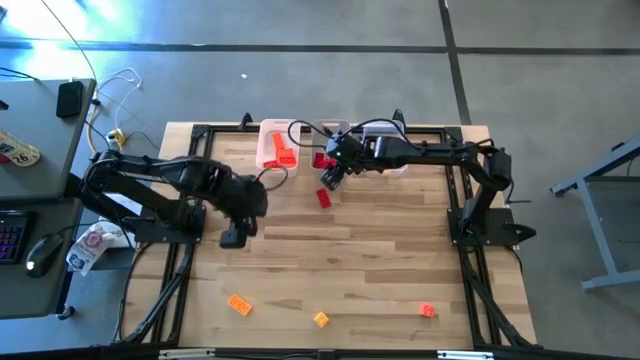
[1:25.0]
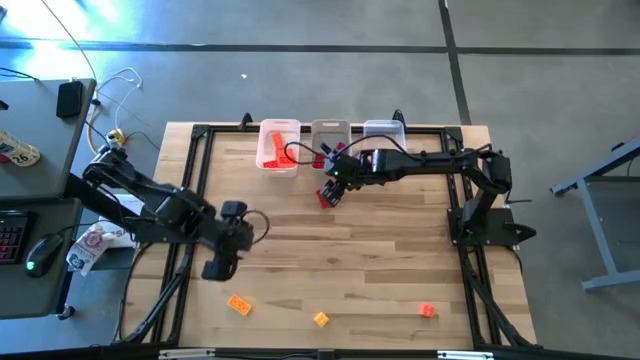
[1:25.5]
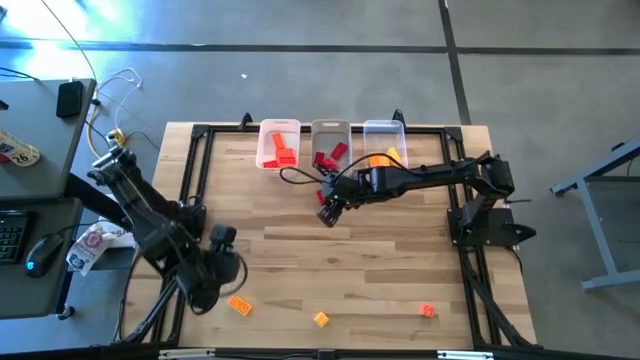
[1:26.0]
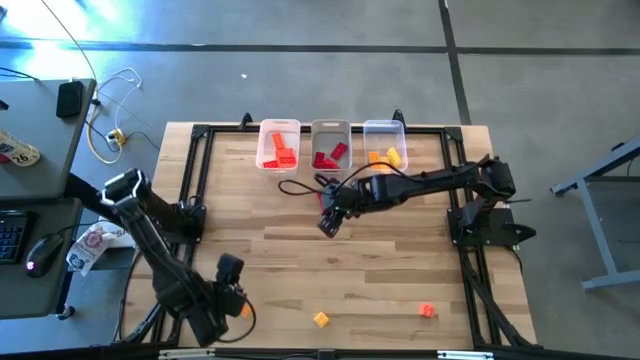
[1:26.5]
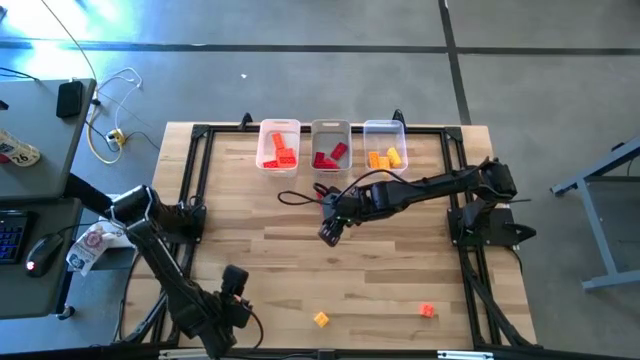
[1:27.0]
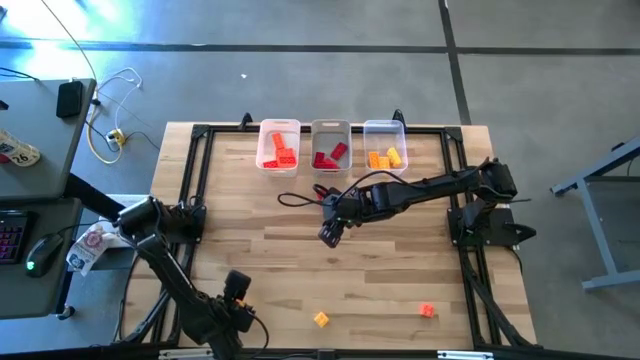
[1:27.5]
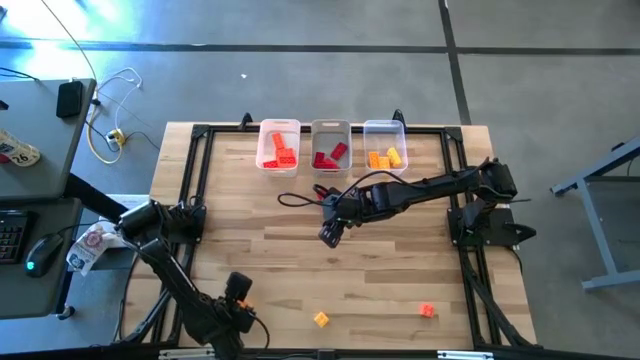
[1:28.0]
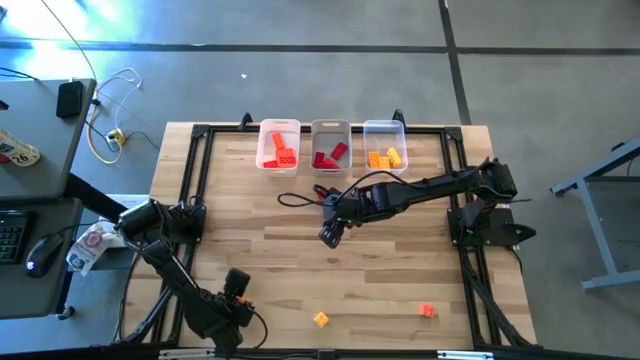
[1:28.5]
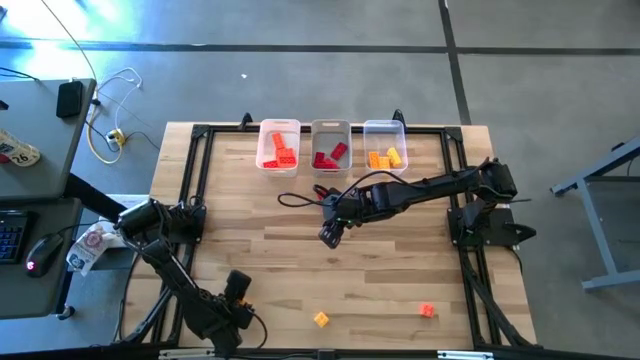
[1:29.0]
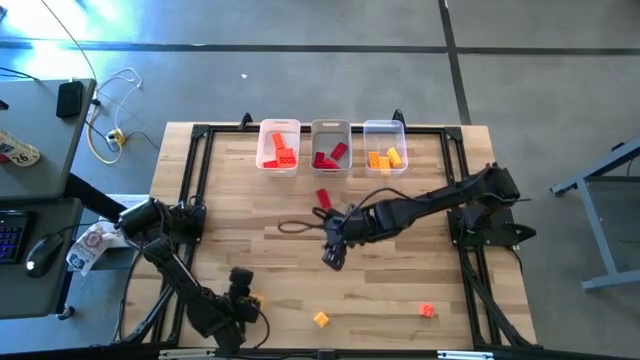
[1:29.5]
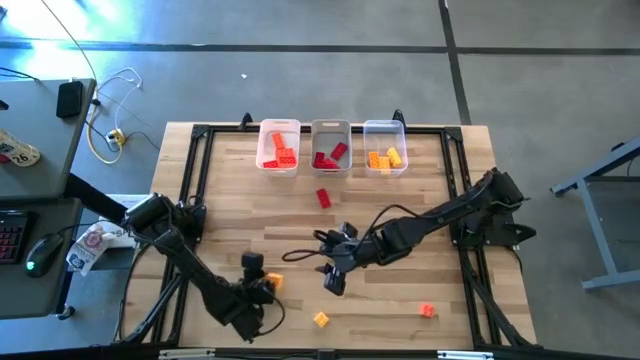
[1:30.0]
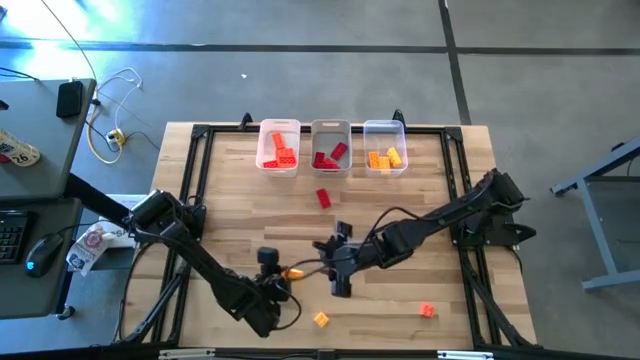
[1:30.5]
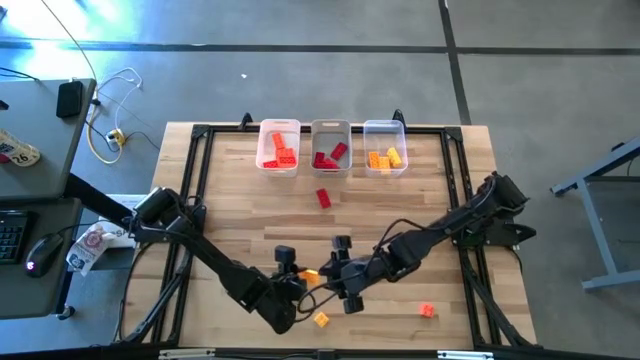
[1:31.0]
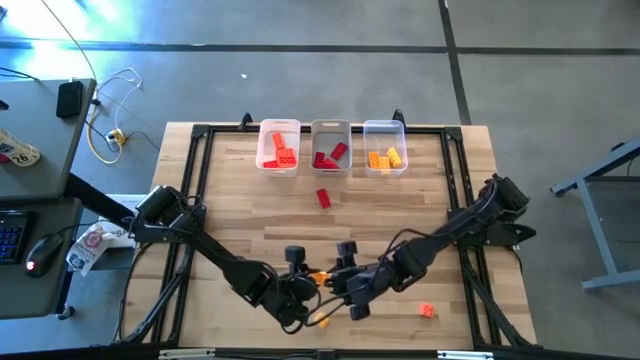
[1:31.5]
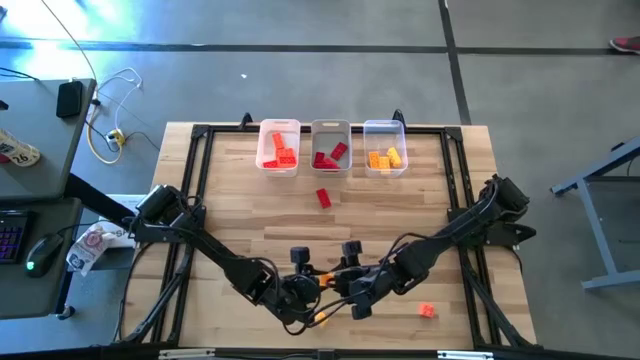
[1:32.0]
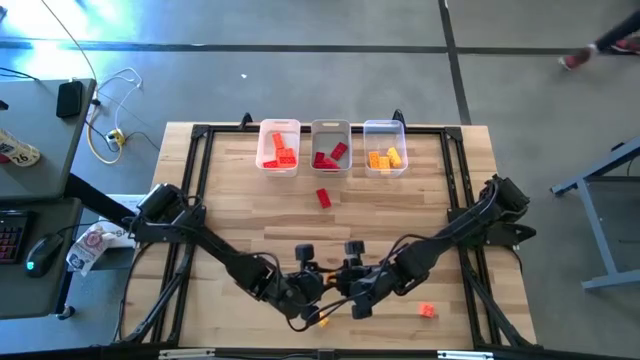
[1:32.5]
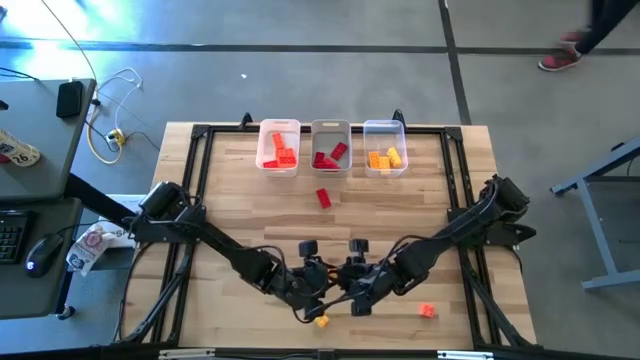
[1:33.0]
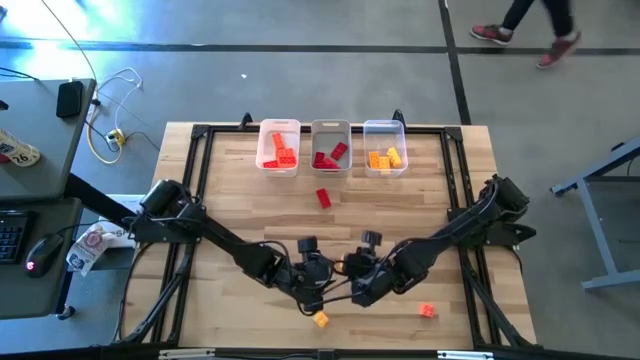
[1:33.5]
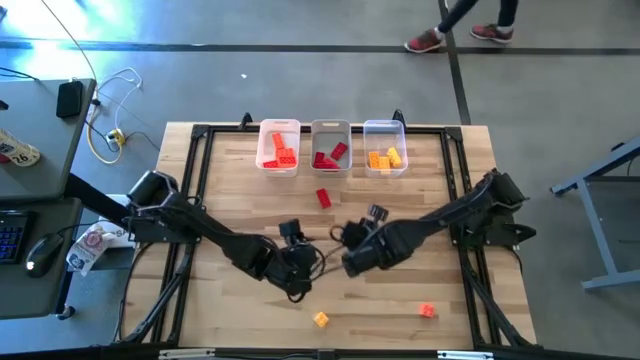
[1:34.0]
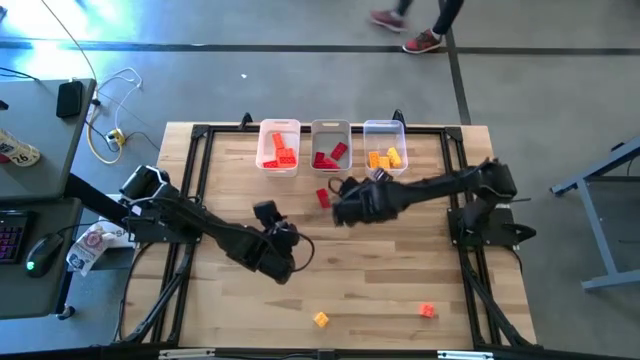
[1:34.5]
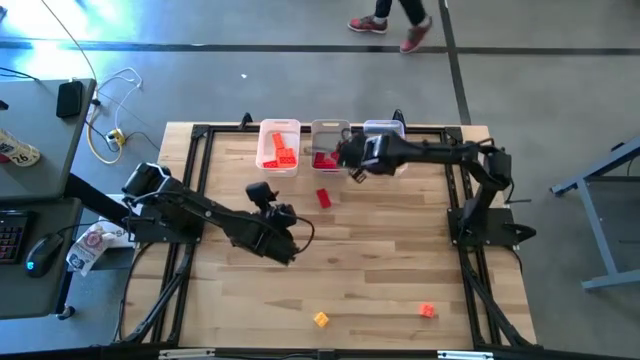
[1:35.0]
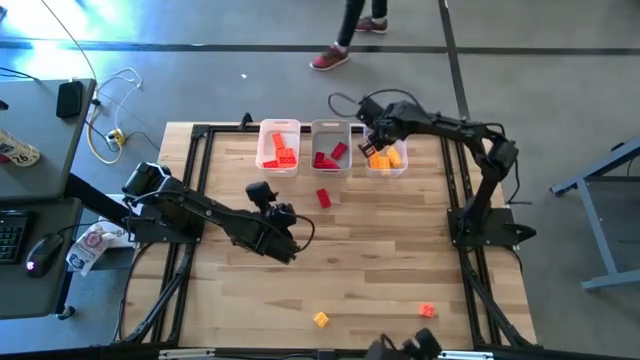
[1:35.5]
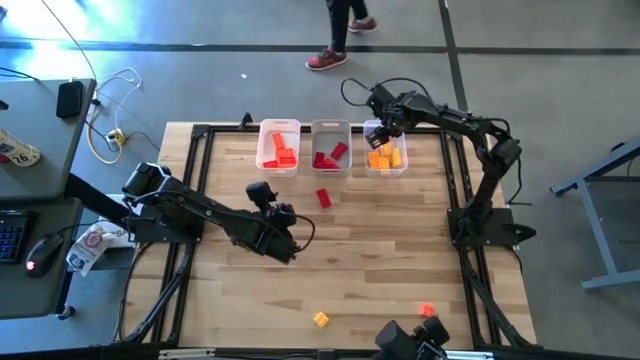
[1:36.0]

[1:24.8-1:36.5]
Task: Sort & place blocks by color
Put the yellow game piece into the transparent bin

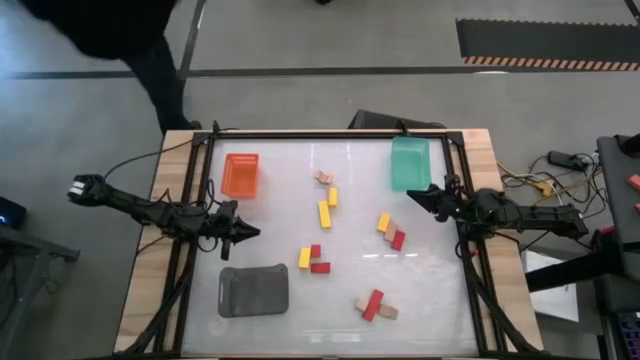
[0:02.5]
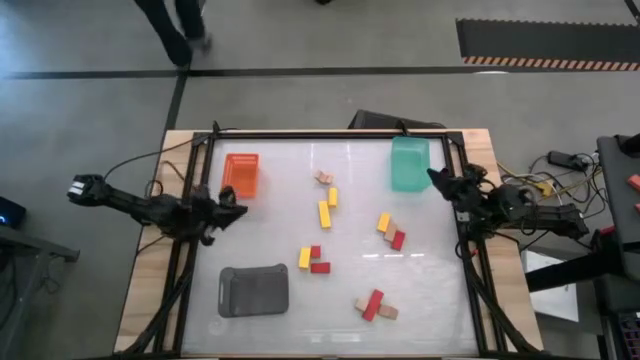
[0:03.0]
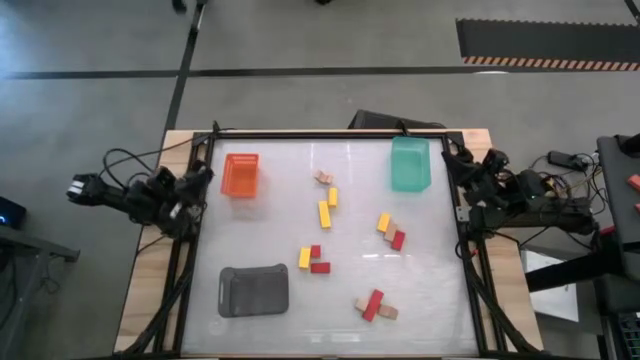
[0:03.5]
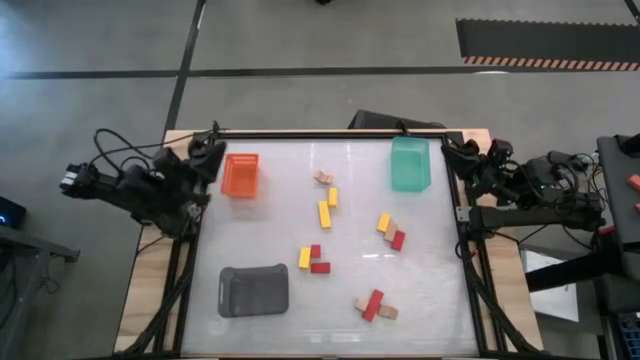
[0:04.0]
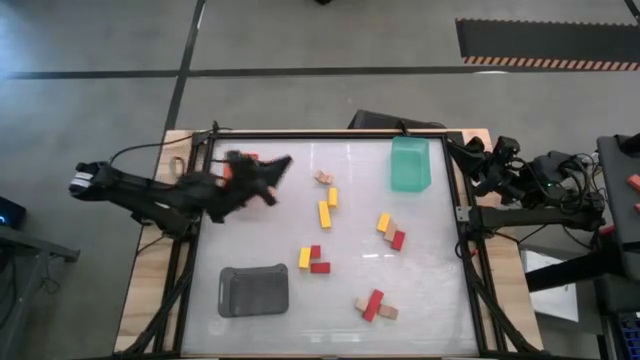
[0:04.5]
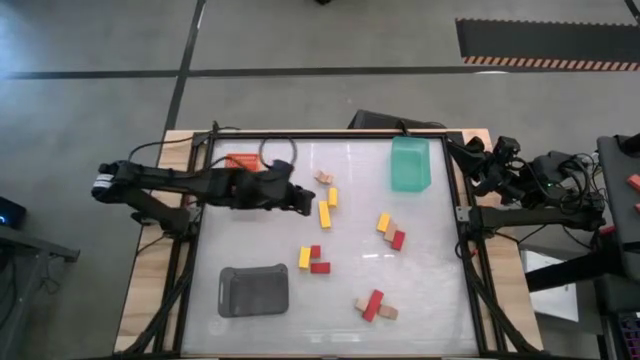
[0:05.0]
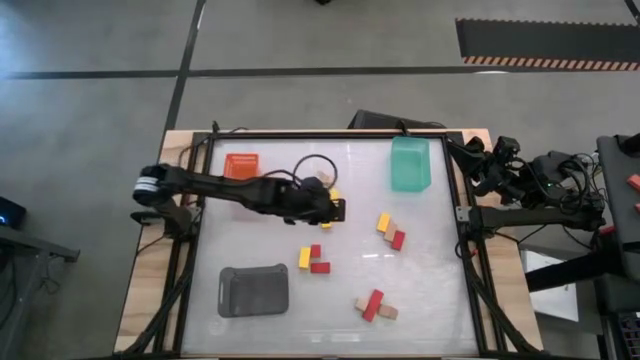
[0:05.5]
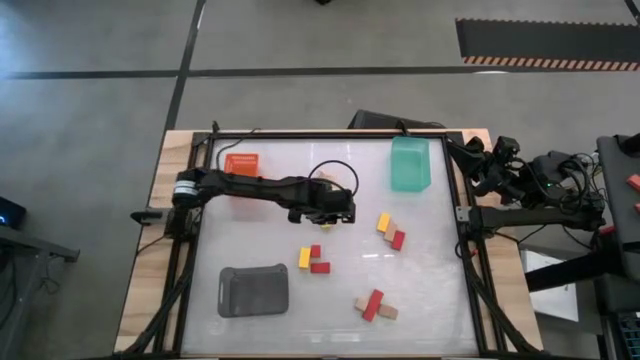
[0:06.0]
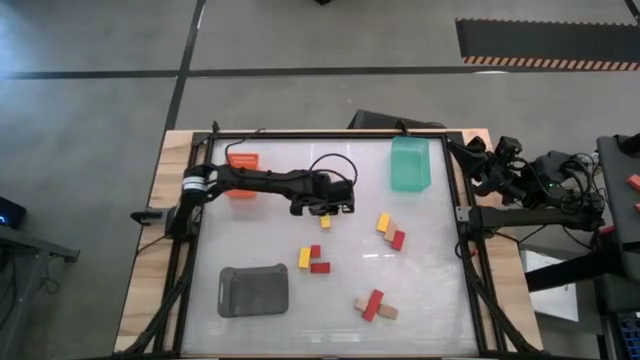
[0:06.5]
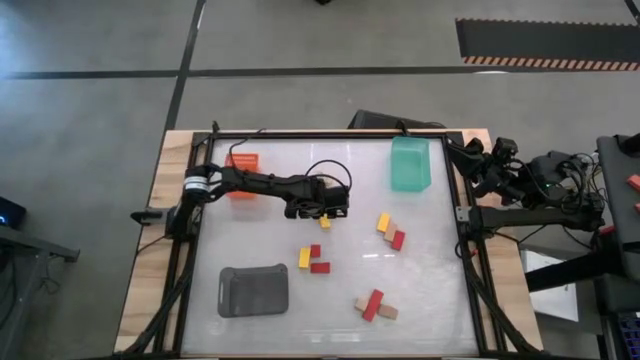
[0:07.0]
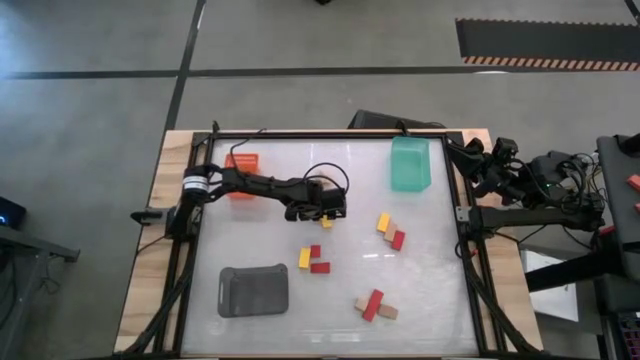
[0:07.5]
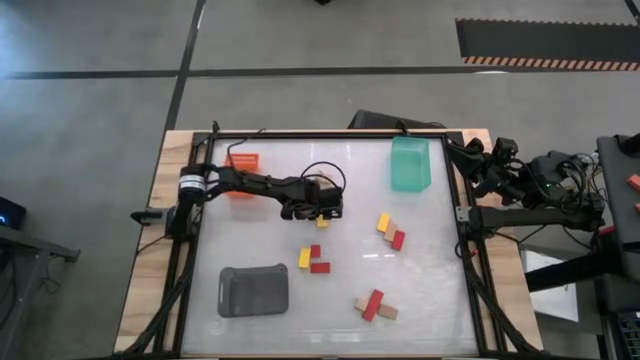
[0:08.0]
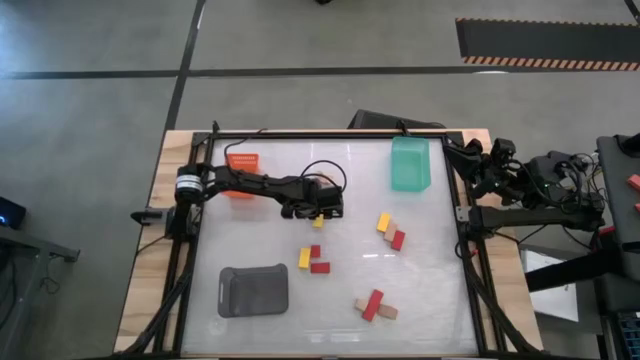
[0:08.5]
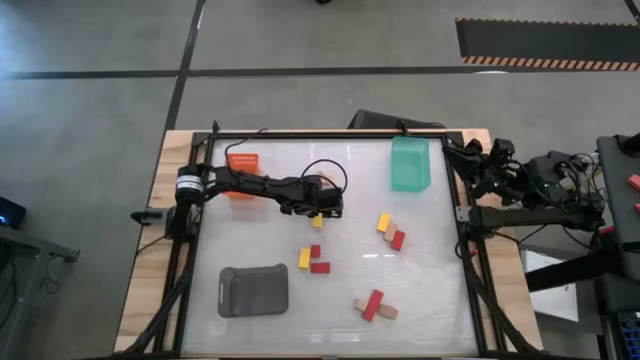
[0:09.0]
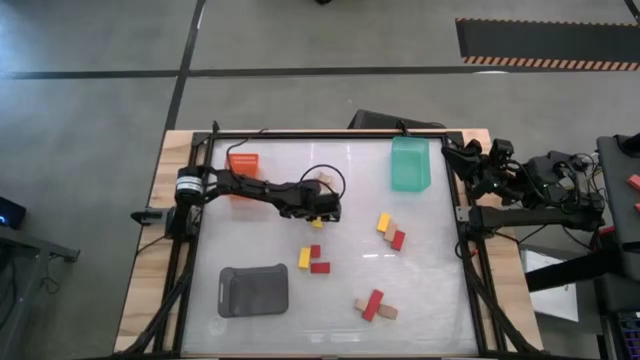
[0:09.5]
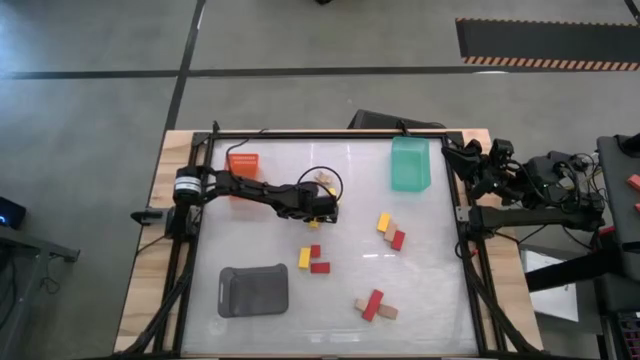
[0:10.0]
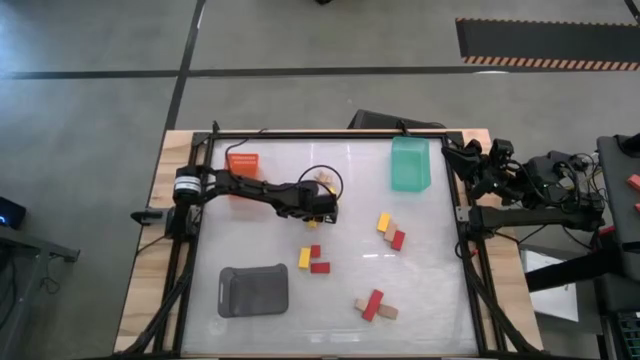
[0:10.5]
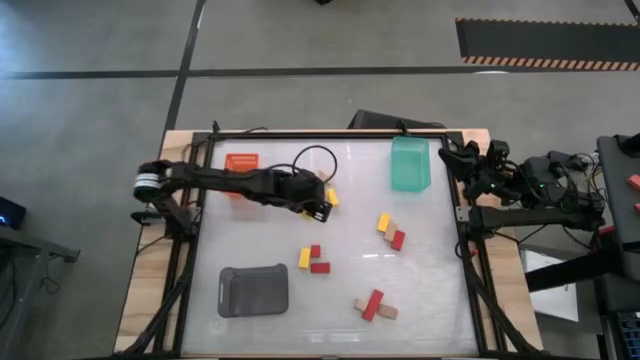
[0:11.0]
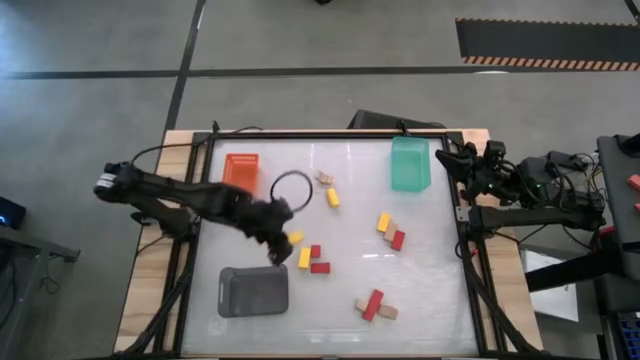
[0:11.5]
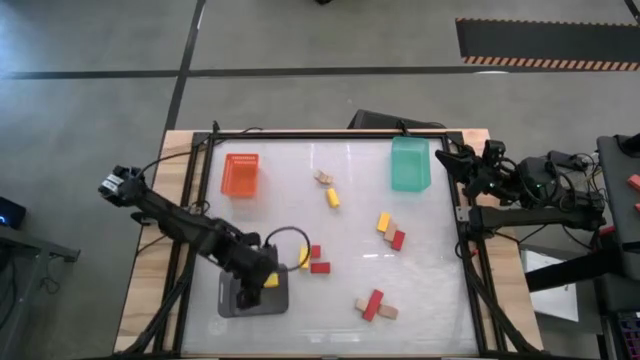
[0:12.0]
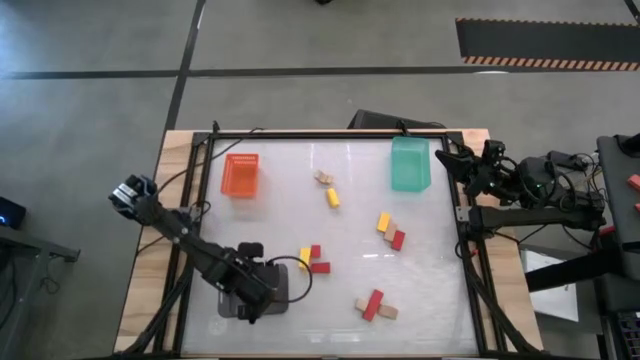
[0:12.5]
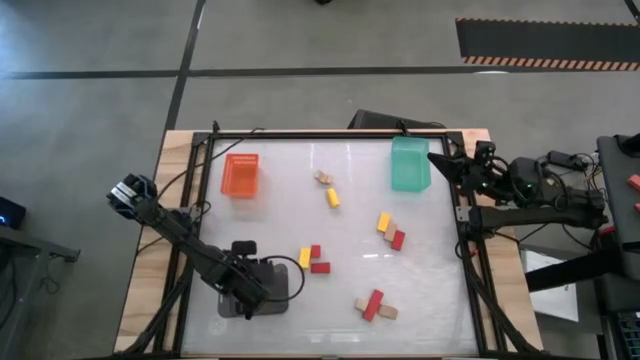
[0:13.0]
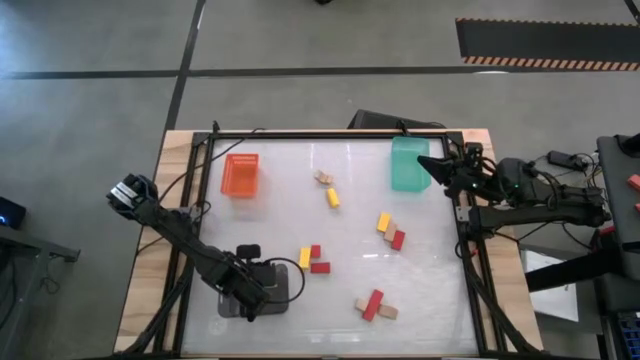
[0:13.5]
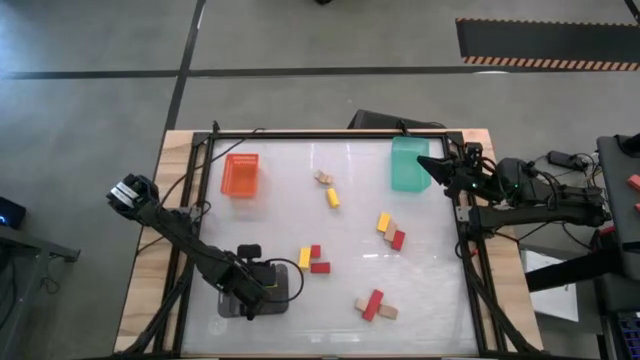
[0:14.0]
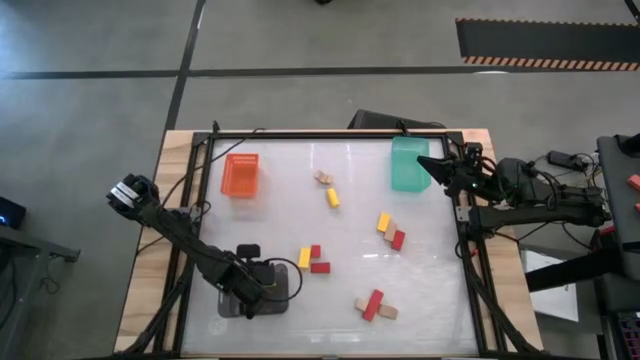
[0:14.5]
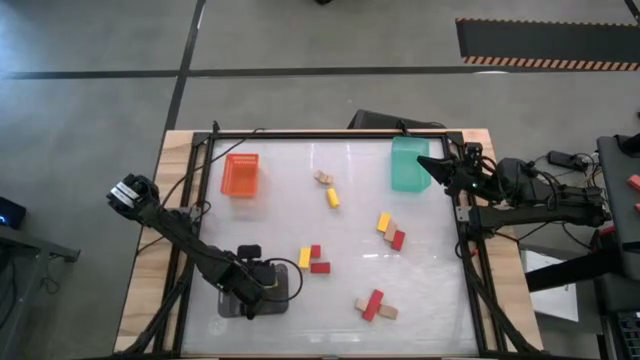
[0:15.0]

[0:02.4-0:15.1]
Task: Sort & place blocks by color
Put the yellow block into the black bin
